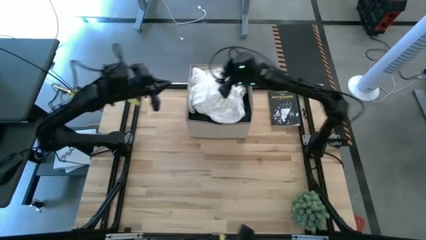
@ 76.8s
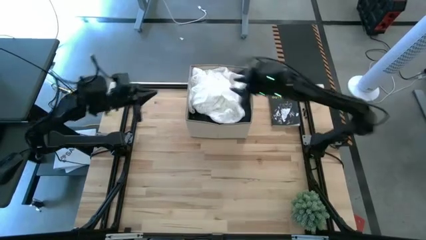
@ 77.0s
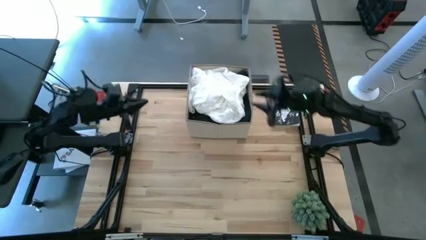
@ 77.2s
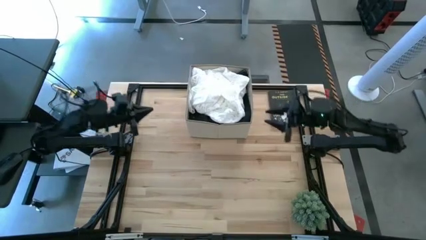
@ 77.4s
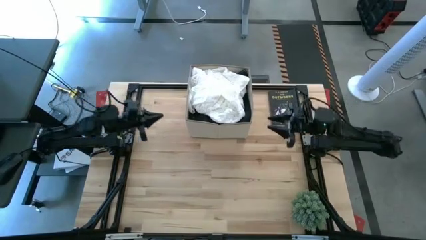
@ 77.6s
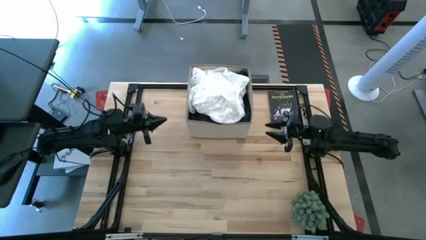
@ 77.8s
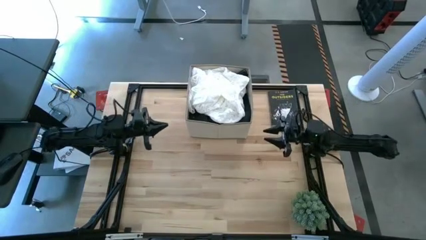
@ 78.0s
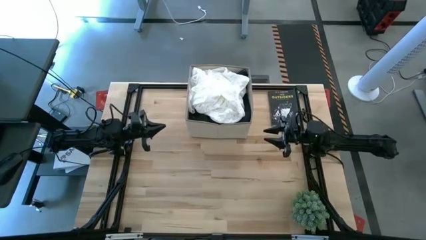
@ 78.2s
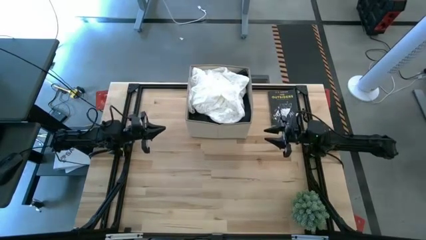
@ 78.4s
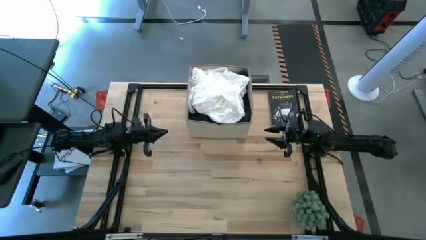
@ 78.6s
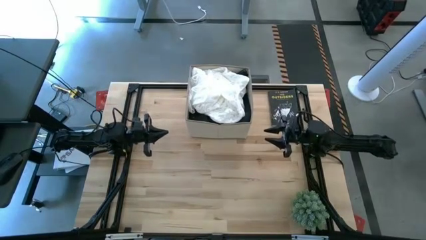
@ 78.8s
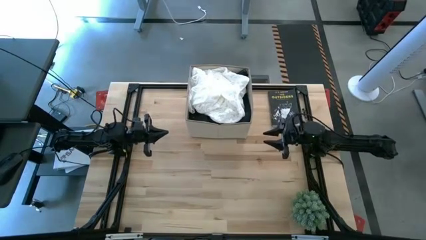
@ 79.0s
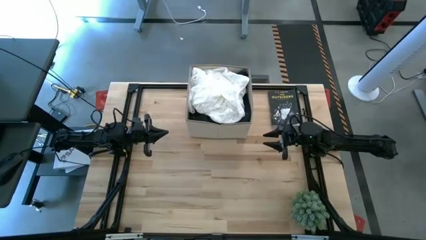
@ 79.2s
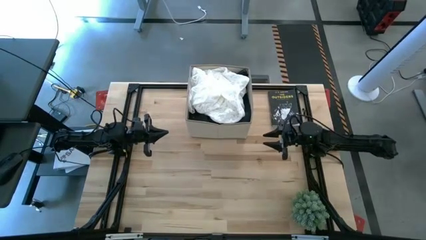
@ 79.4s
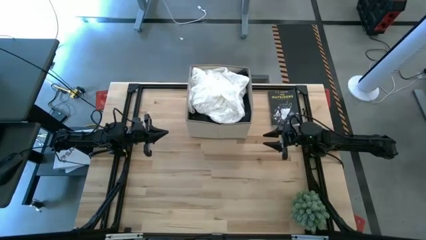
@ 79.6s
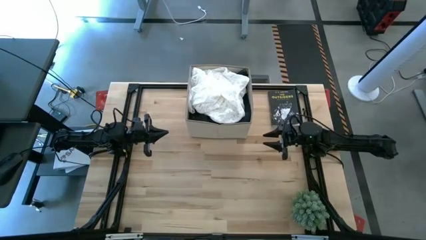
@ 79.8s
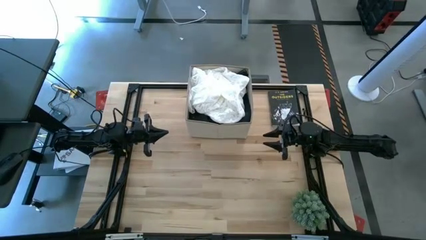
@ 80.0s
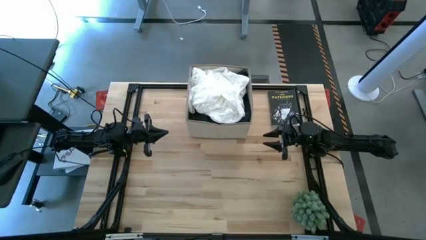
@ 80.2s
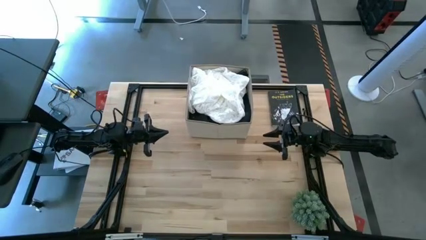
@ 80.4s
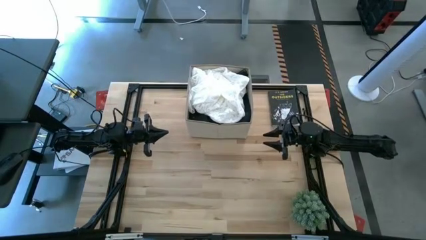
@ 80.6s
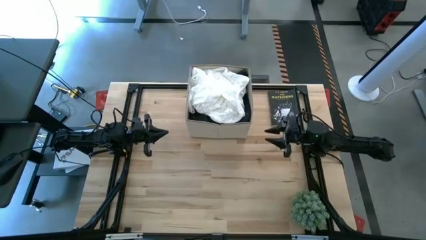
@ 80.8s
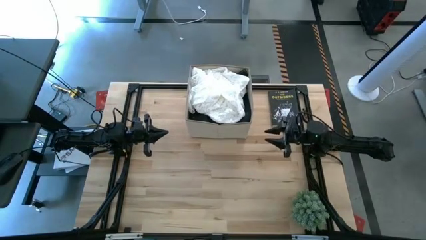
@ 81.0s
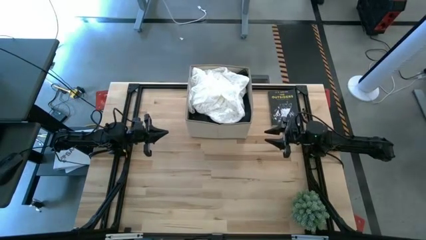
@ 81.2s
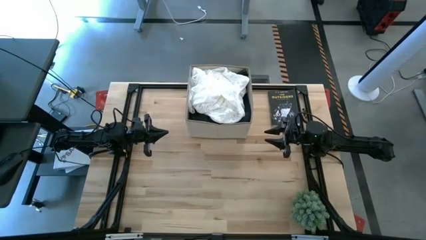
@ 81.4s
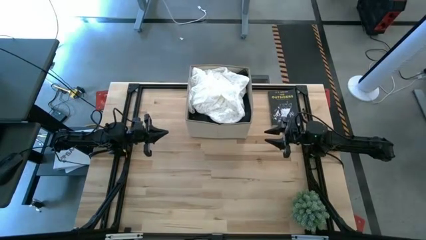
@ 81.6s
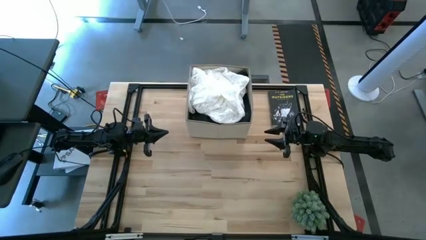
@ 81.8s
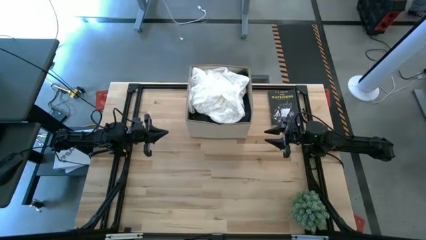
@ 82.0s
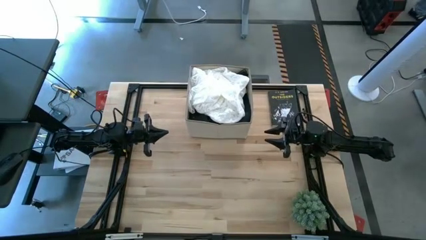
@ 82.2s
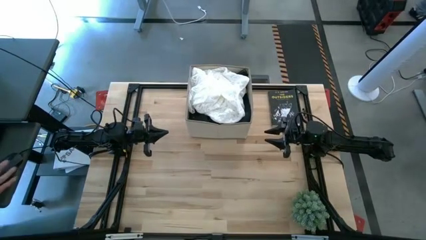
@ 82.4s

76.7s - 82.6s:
Task: Sort clothes
Return to Home Position

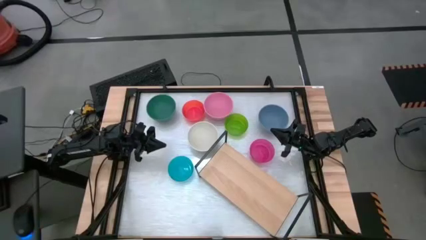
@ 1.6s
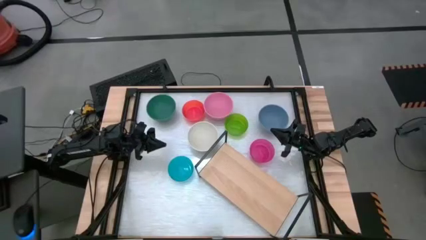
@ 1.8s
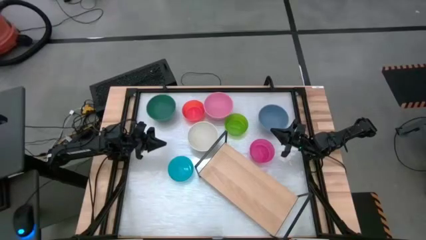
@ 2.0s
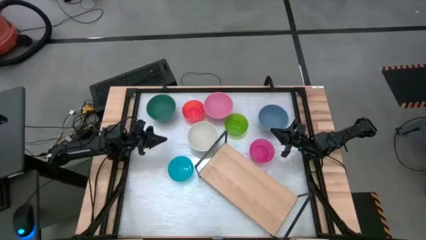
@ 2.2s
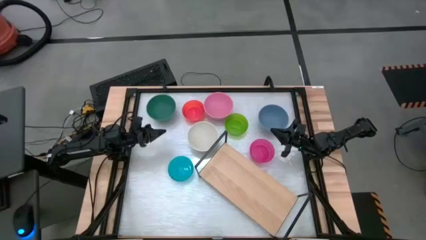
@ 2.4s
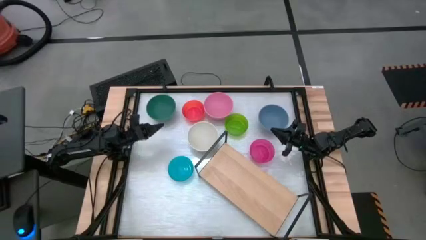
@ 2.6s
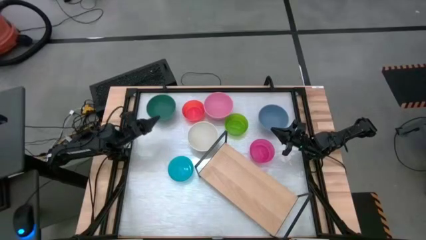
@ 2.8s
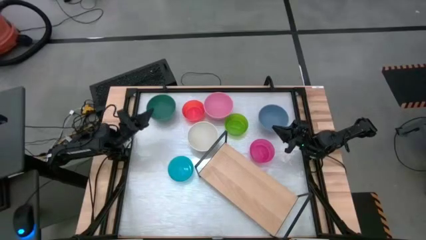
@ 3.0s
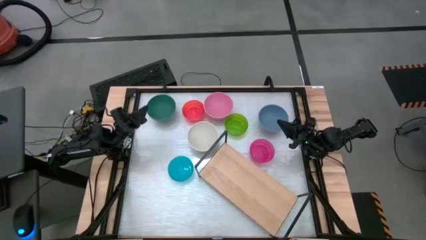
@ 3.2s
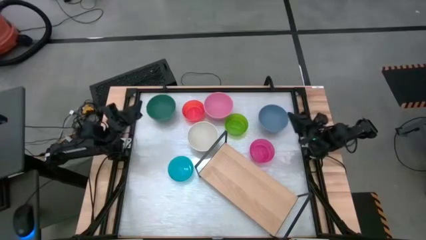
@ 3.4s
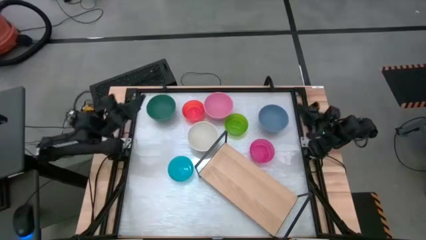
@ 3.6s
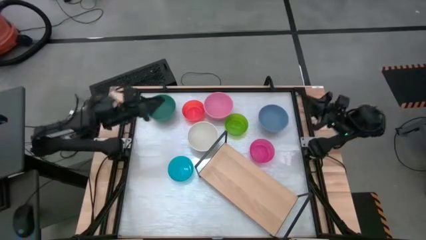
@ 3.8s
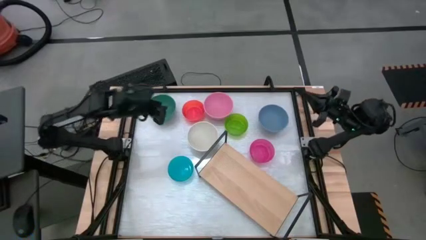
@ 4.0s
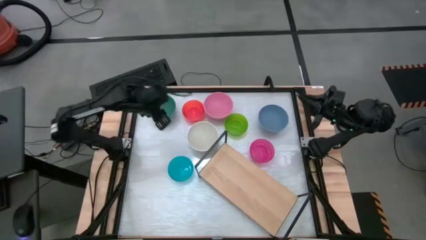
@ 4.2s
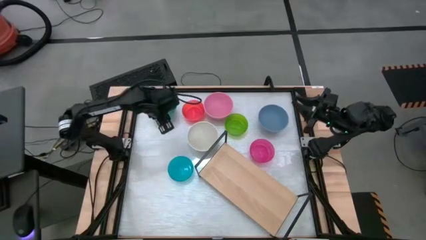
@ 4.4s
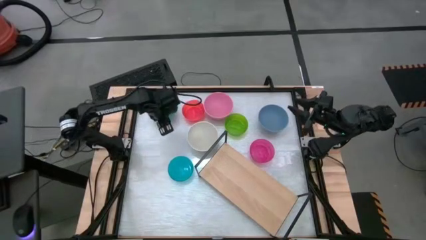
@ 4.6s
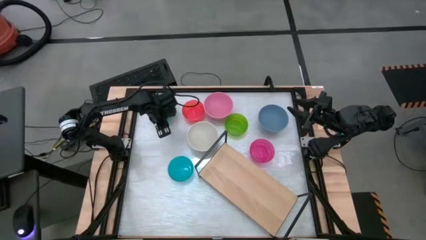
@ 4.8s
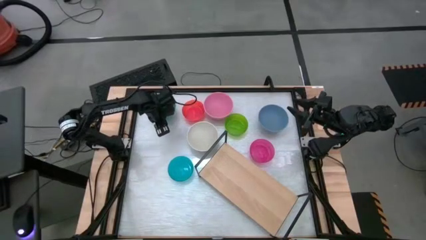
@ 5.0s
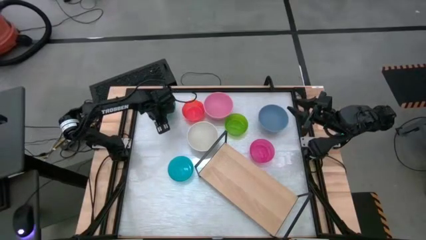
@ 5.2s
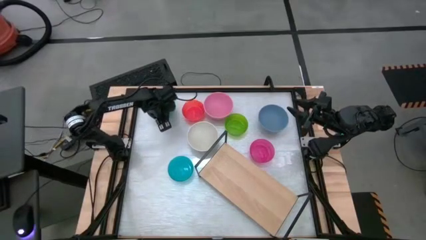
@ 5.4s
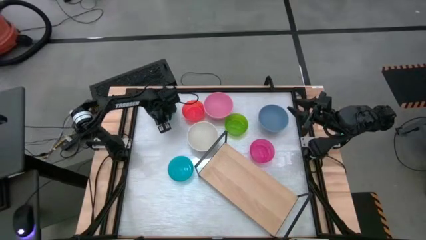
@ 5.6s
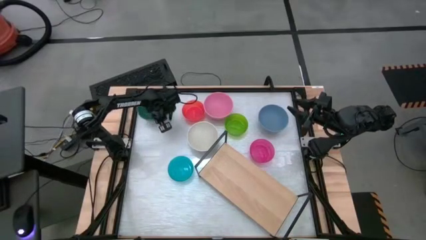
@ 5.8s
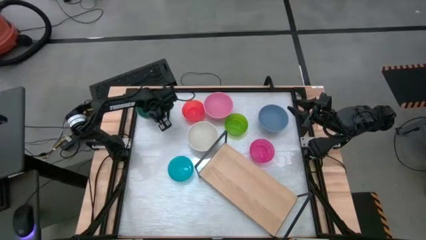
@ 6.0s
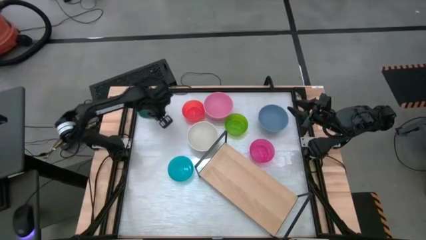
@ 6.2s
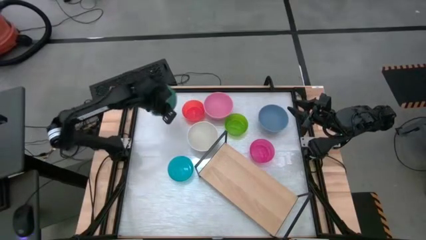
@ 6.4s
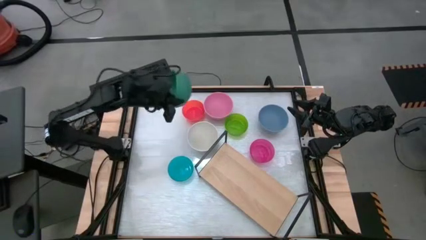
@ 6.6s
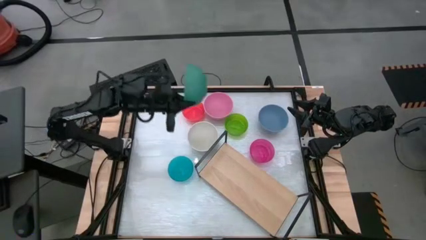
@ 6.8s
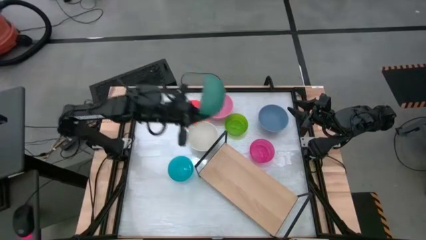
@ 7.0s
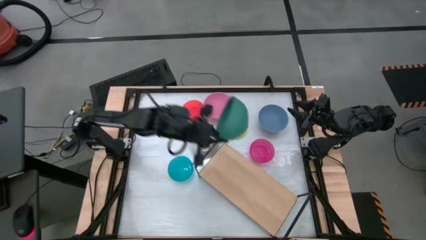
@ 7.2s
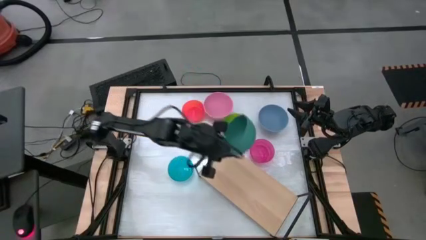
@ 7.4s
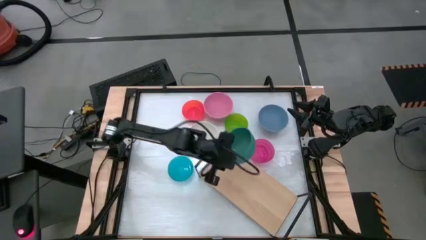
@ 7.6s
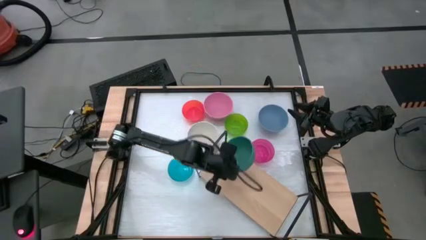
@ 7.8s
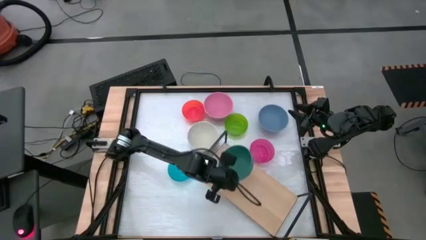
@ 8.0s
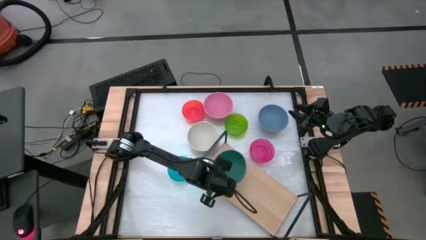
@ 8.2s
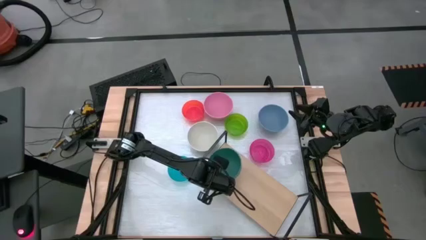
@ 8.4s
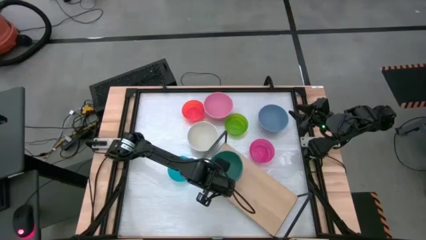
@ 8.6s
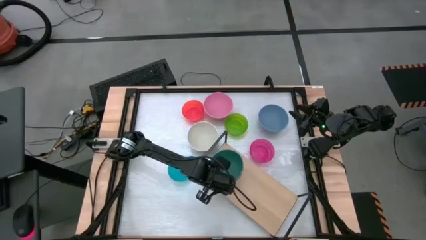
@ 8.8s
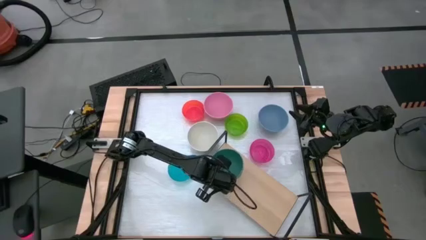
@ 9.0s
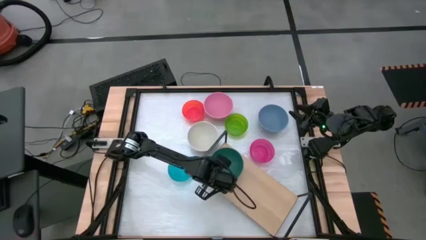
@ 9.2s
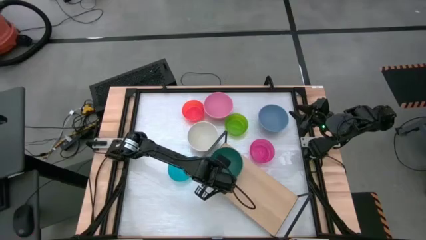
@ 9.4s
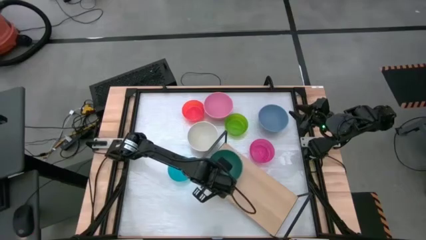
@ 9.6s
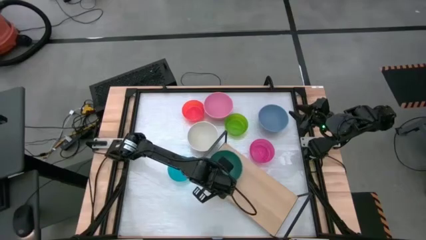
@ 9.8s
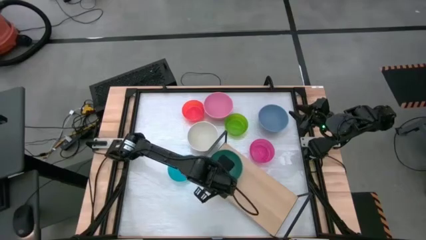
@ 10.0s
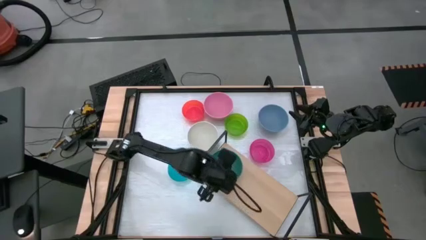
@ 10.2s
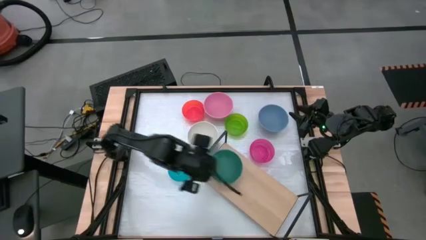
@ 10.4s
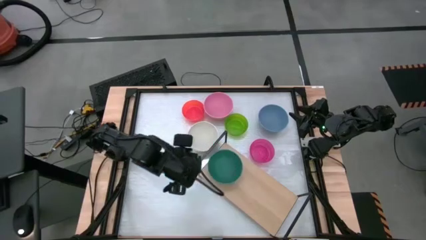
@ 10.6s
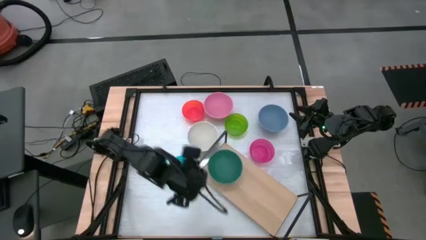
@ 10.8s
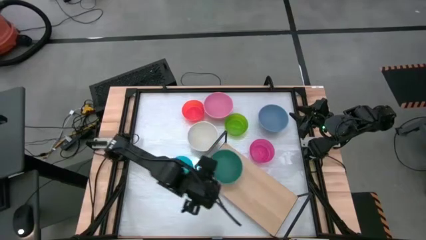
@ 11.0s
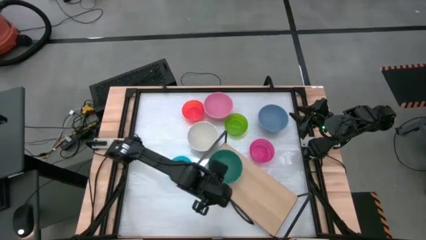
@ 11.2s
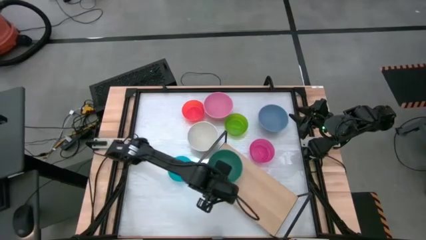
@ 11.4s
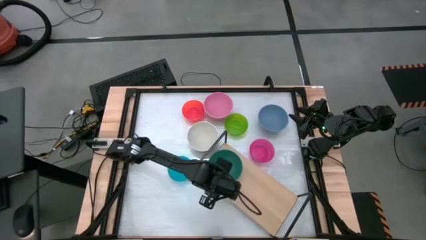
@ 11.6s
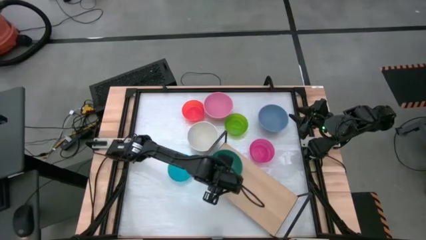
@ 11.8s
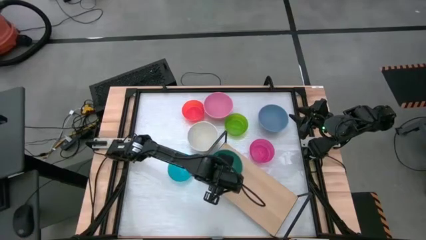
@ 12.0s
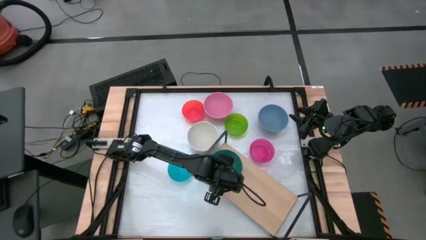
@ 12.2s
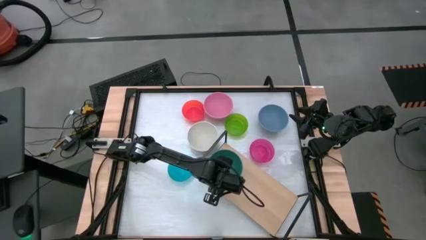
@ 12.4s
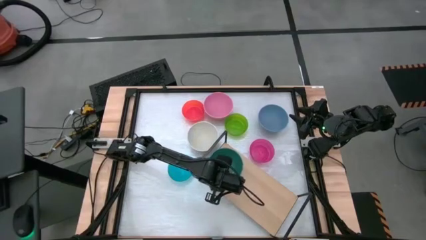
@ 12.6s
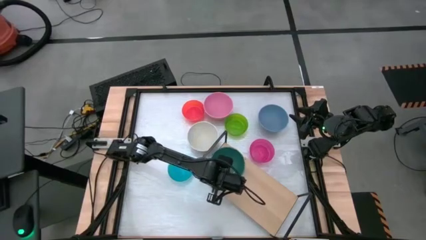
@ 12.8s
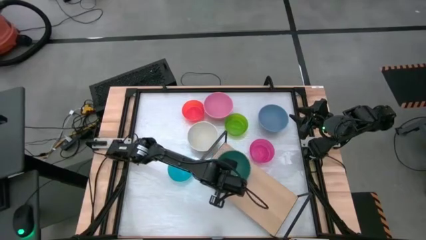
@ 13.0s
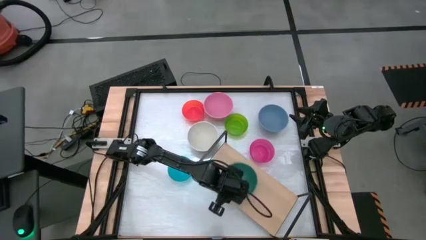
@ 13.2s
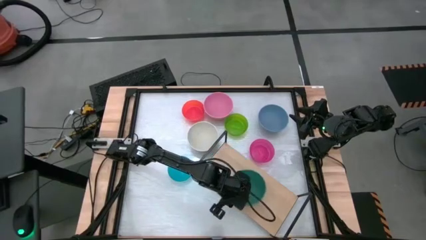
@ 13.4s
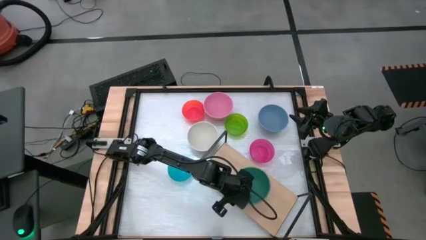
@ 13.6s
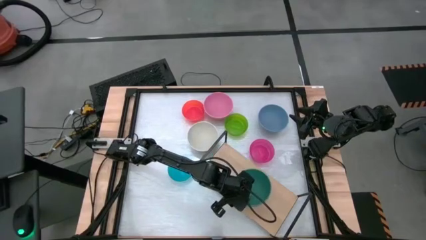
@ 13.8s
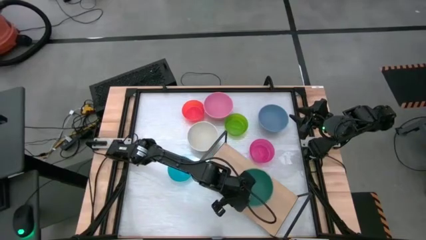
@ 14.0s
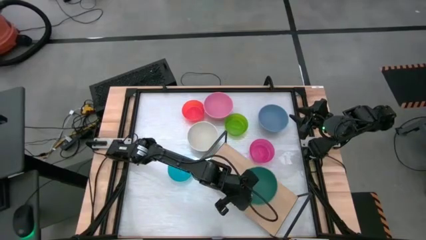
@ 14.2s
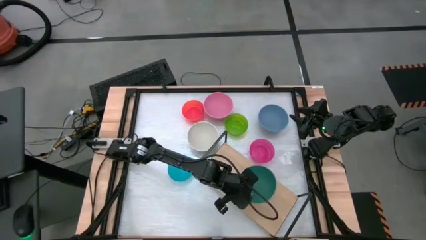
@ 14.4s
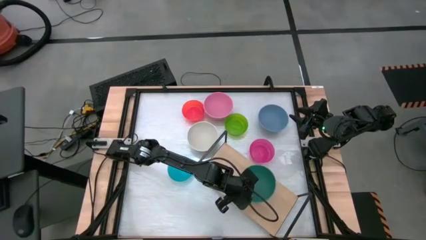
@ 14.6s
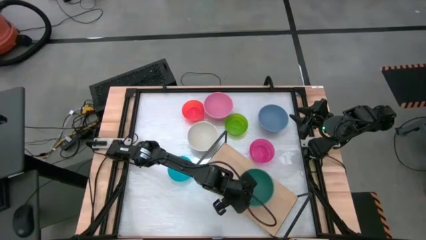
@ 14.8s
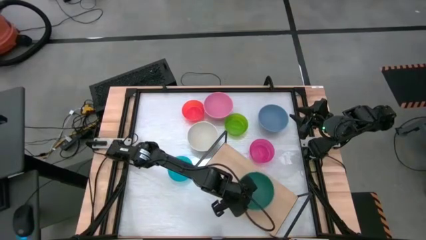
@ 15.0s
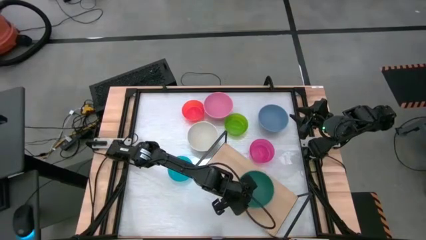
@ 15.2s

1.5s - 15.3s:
Task: Place and stack bowls onto a shelf
Put the large green bowl on the shelf
